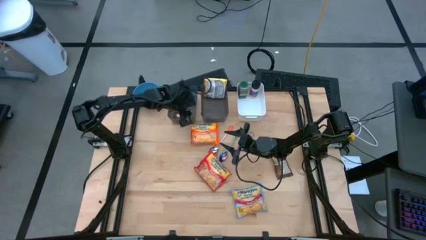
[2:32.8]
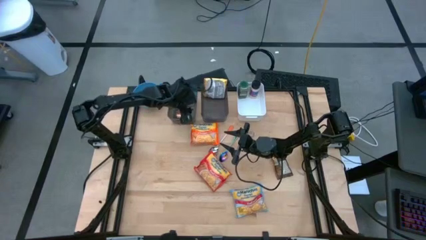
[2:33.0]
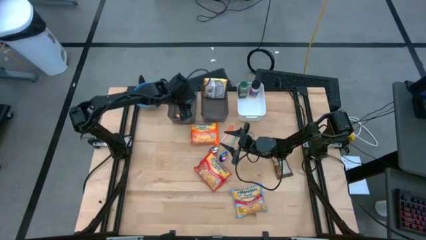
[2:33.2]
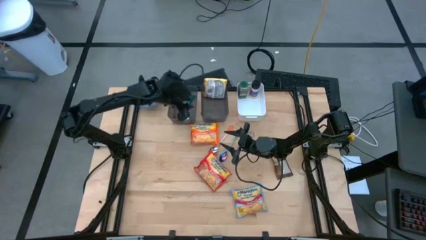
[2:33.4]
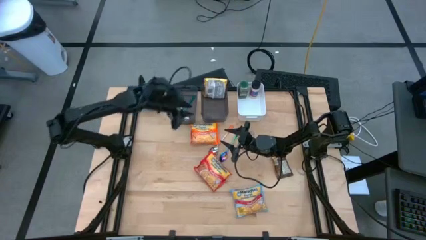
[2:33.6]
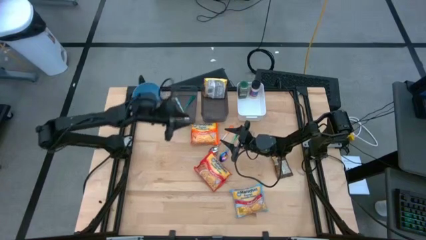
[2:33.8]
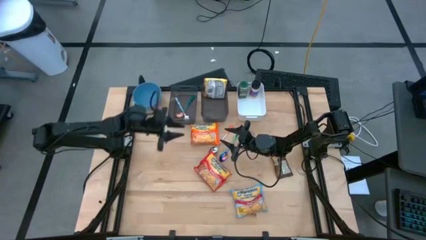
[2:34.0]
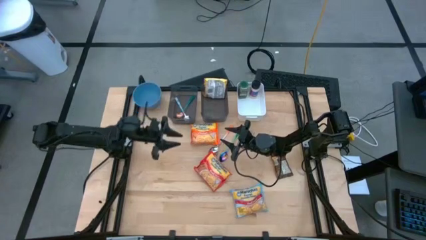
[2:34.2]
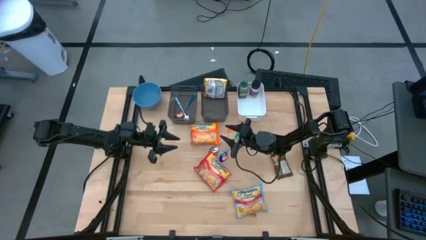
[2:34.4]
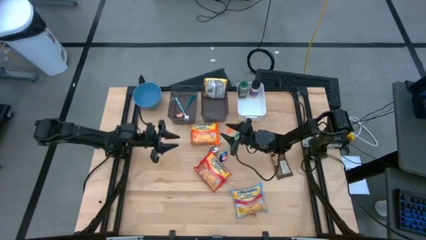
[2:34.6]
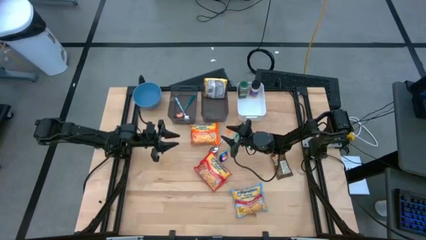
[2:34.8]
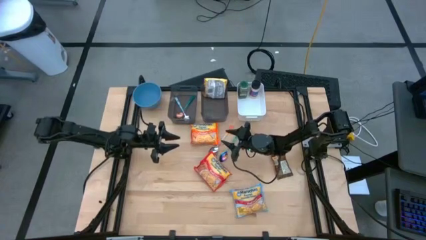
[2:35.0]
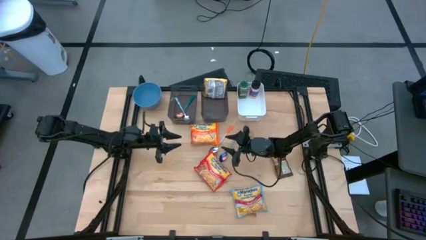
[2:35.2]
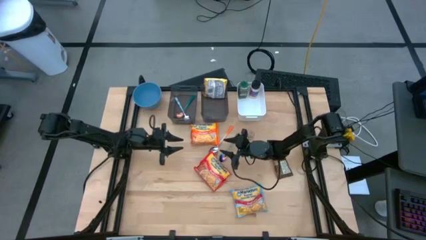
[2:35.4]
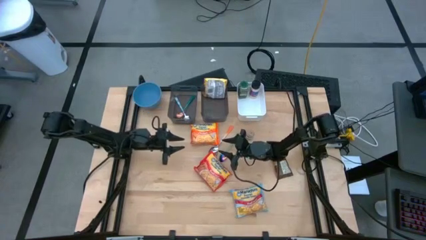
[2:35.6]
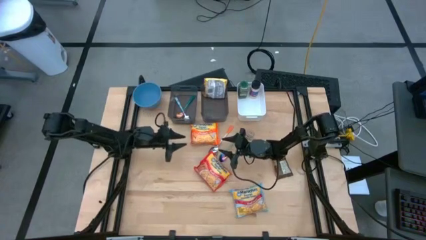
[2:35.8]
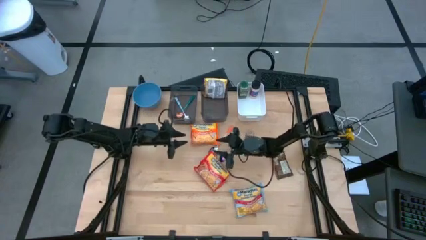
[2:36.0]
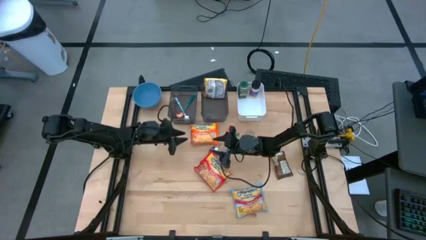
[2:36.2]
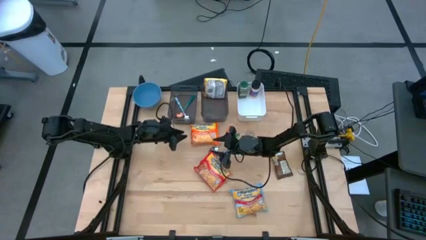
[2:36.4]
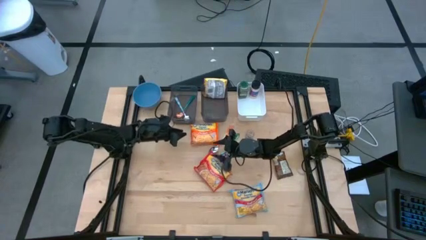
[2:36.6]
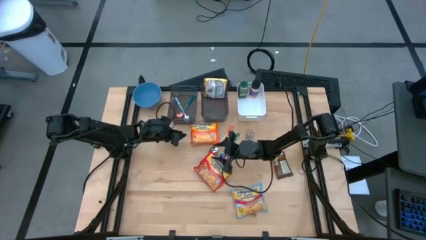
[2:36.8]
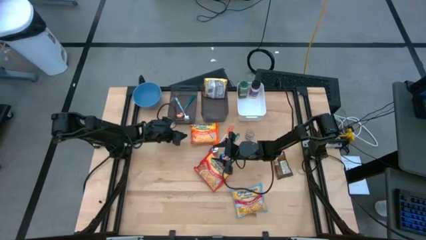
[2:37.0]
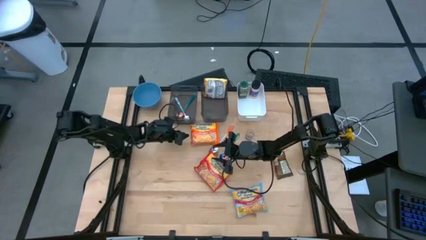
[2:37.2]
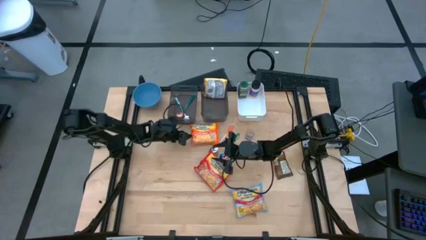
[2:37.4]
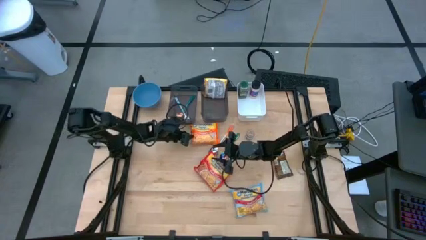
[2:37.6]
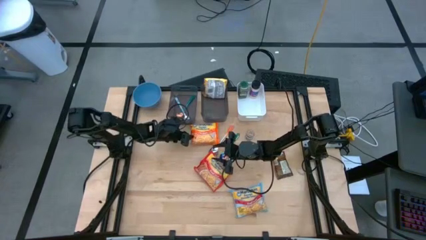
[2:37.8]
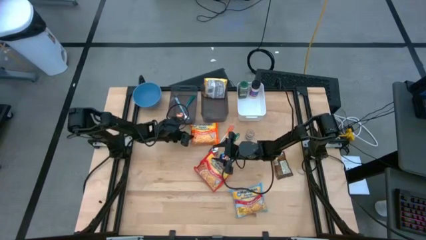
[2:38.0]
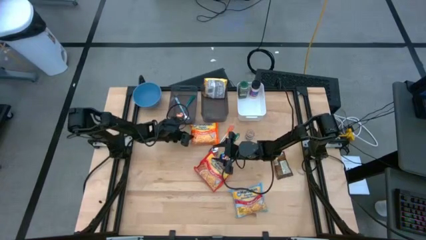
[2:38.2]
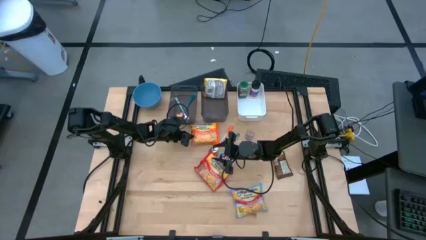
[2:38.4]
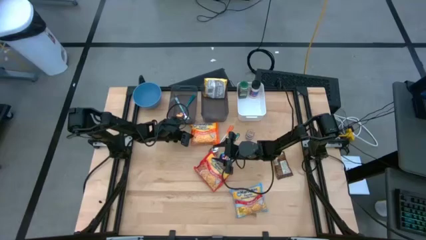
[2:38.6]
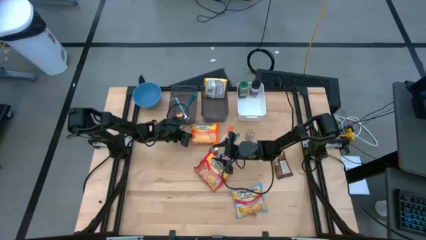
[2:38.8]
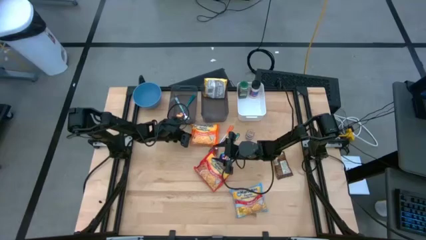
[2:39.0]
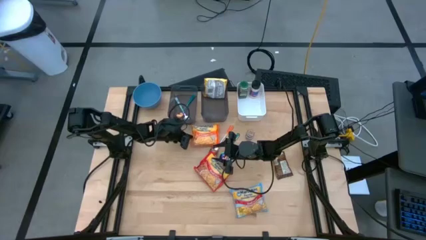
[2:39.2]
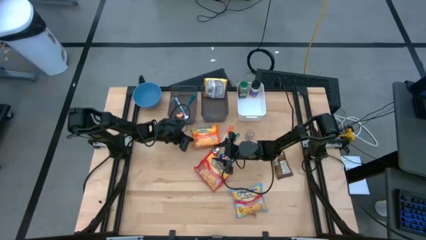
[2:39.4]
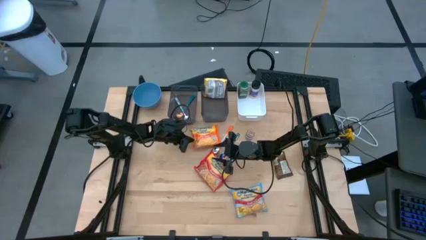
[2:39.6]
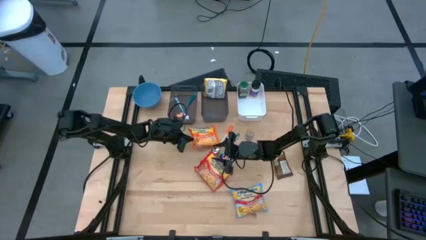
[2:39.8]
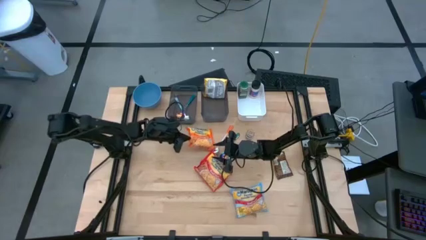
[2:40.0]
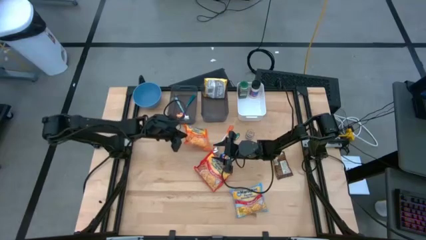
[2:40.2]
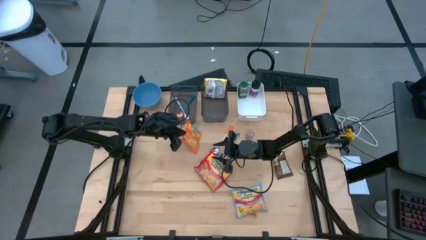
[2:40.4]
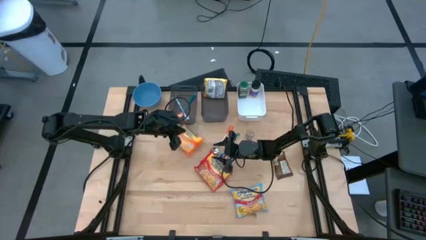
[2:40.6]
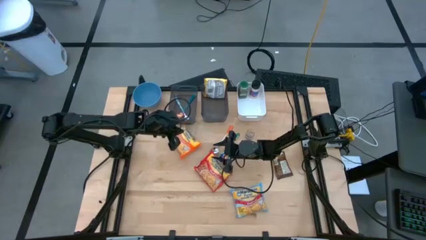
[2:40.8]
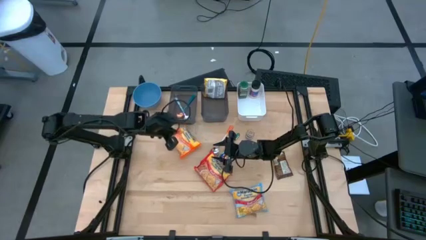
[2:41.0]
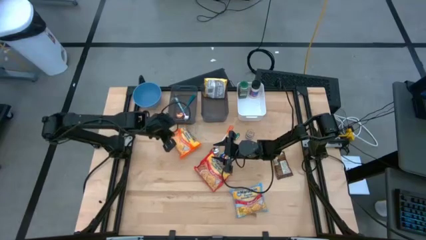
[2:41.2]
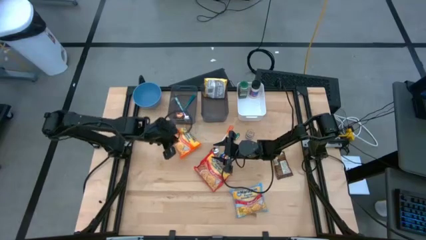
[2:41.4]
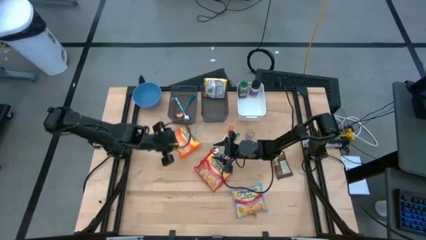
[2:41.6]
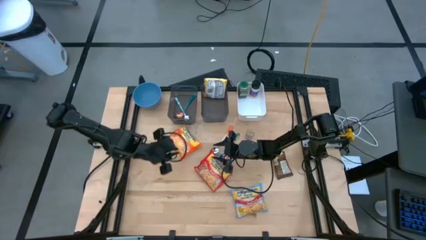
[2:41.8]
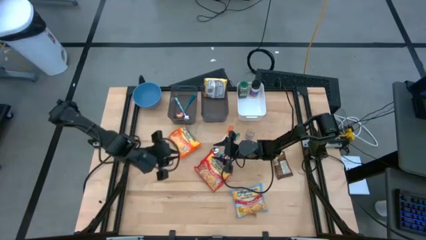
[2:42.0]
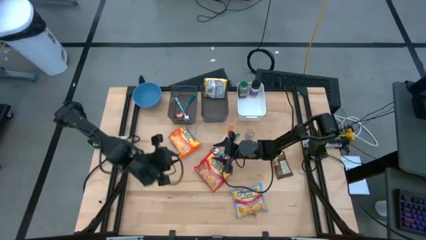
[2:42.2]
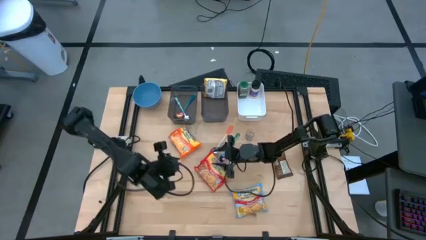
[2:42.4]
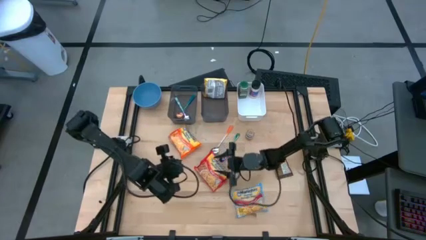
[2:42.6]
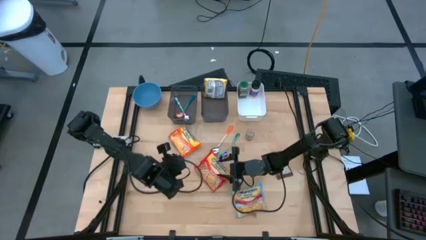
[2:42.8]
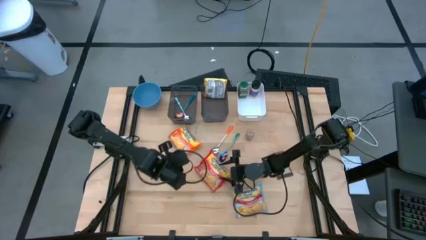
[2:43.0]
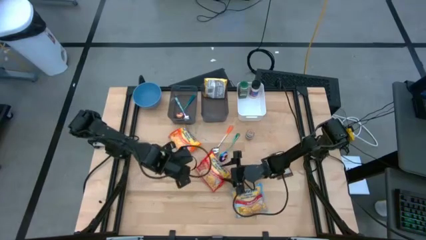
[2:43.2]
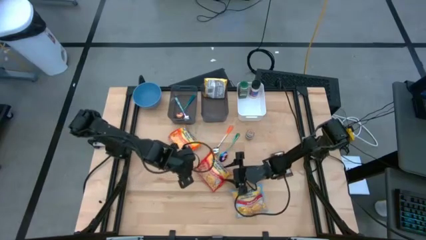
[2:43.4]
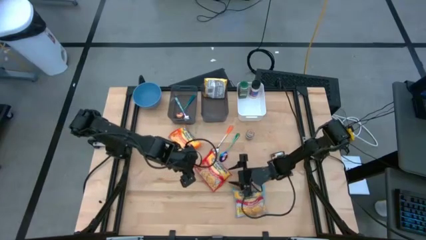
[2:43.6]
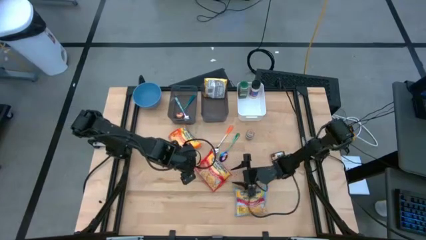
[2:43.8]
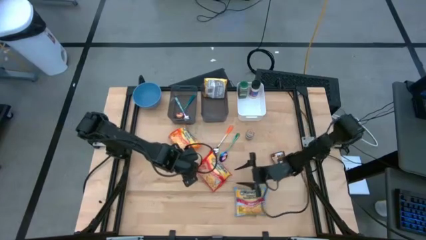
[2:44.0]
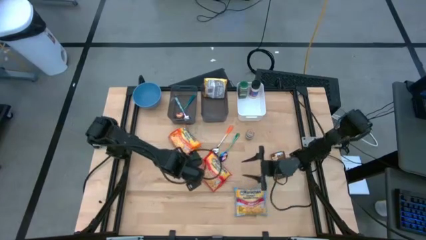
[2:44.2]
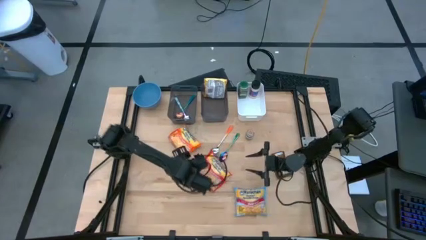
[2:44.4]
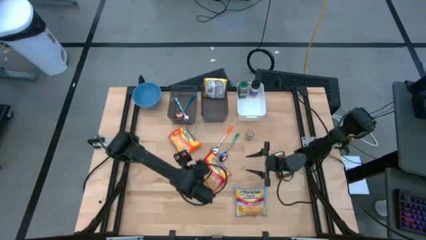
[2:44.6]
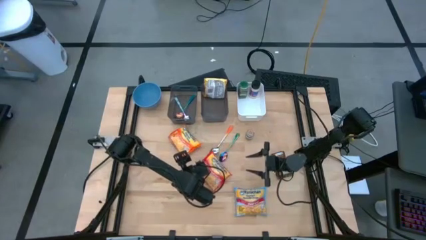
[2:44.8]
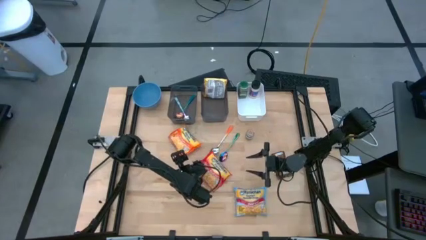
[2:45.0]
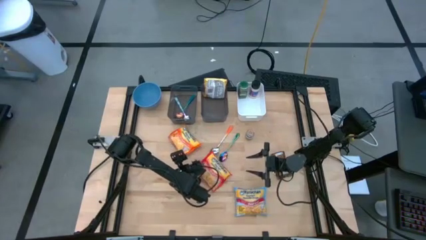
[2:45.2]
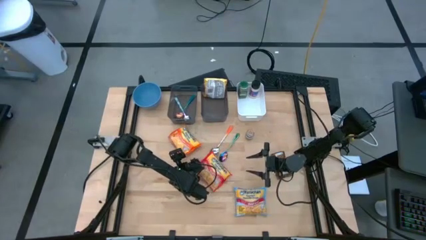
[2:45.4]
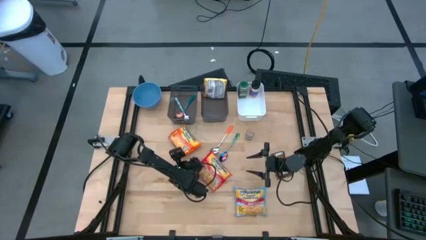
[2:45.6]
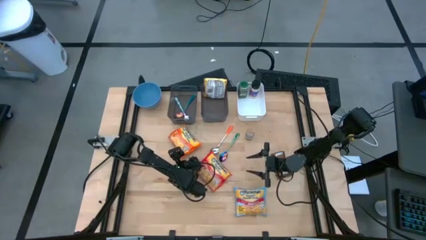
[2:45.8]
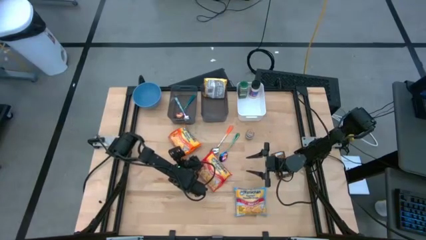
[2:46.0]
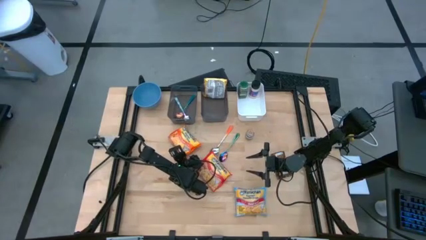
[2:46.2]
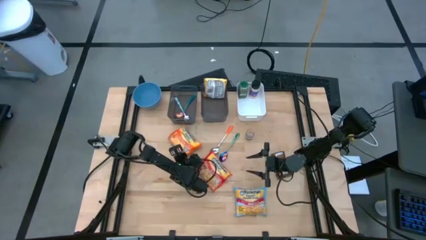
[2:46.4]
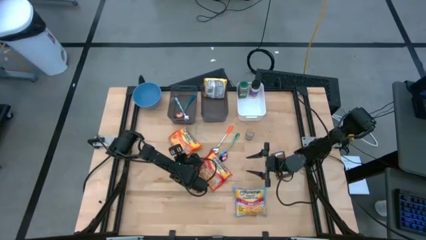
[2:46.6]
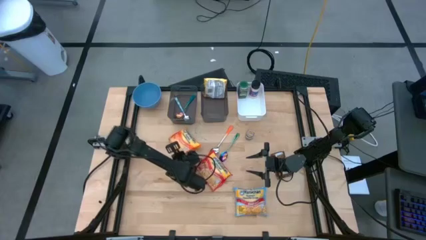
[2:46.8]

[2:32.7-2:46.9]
Task: Pick & Place Food Item
Put the orange noodle pack into the right black bin

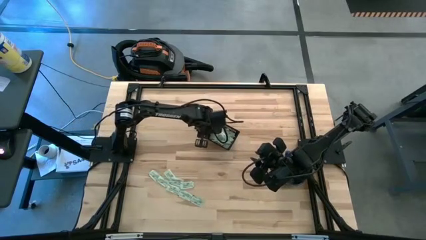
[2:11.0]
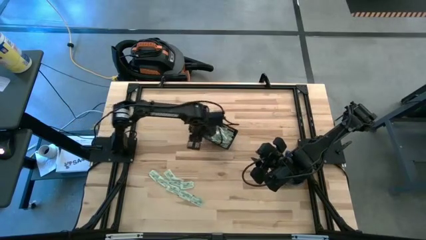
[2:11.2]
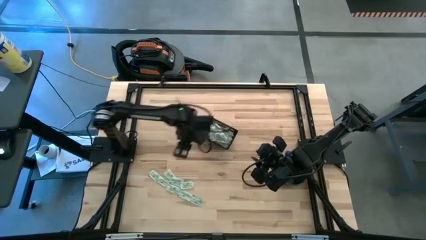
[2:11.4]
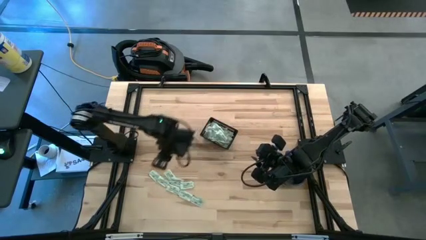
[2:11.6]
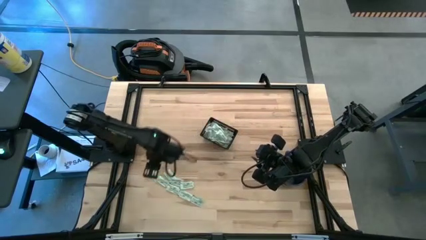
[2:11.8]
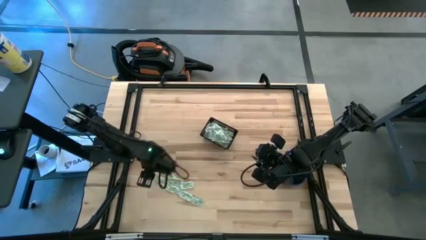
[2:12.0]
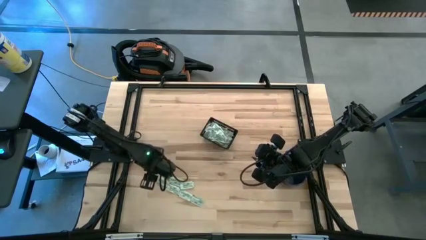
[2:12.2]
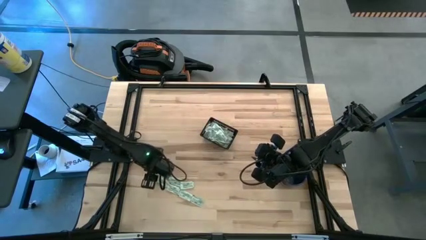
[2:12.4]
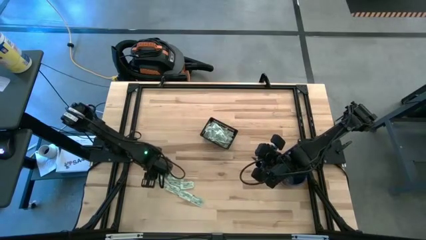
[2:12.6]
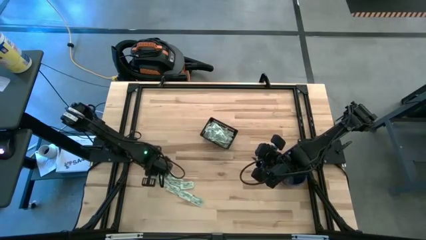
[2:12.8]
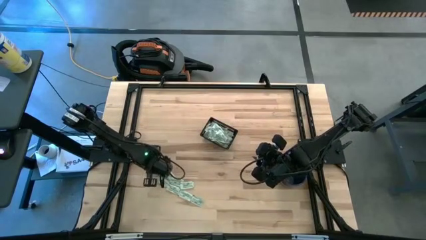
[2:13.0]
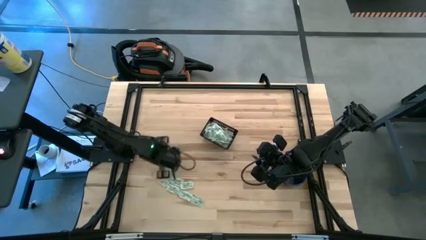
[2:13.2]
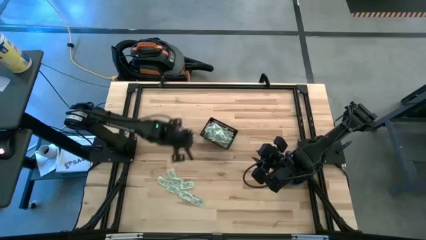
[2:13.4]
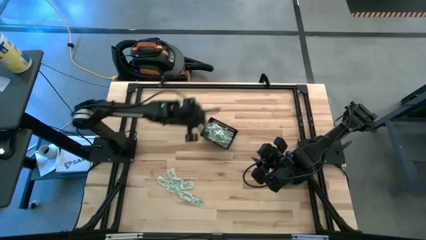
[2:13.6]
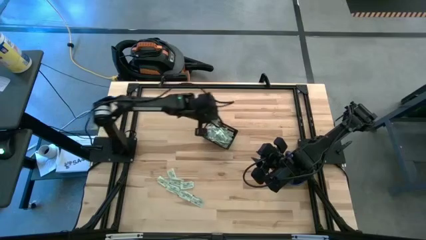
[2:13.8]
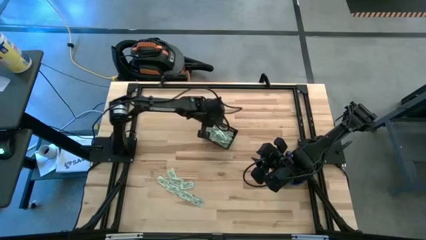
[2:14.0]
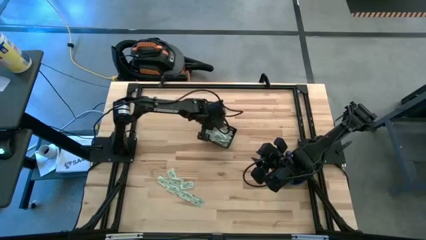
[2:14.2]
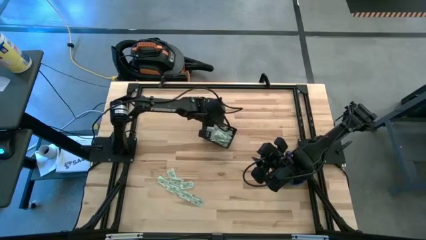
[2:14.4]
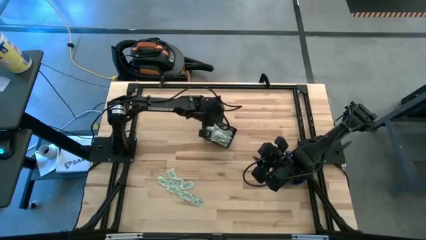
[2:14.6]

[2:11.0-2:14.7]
Task: Pick and place Stevia / Truvia into bins
Put the stevia packet into the black bin
